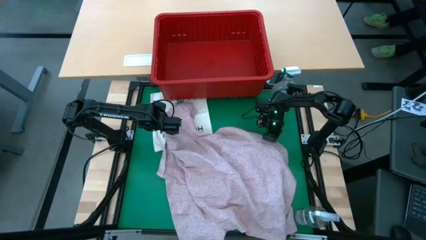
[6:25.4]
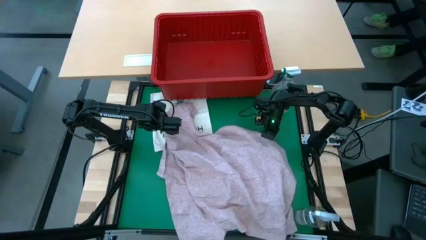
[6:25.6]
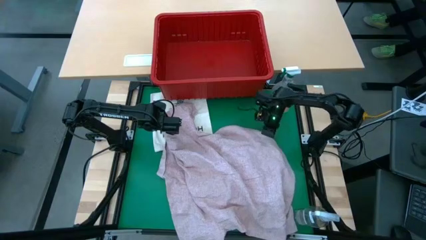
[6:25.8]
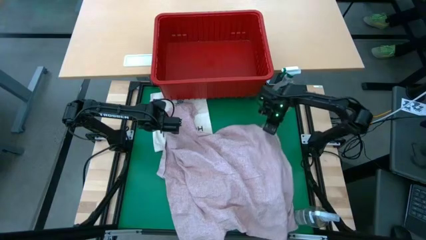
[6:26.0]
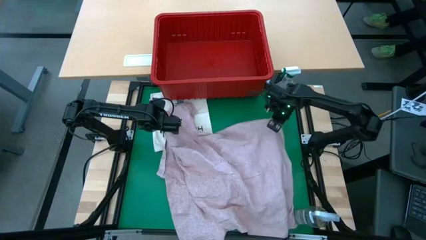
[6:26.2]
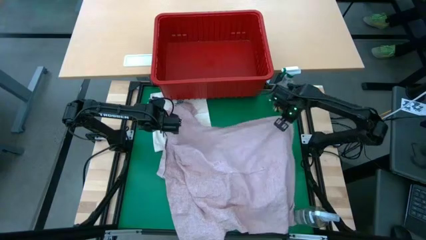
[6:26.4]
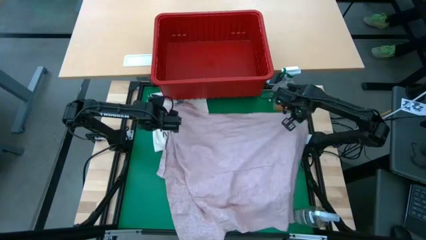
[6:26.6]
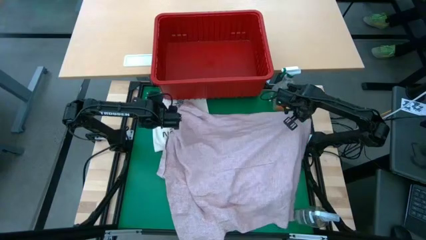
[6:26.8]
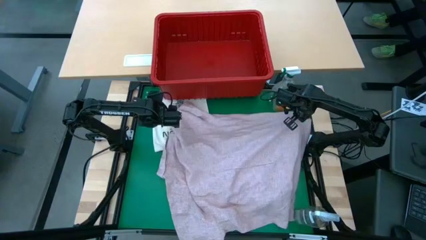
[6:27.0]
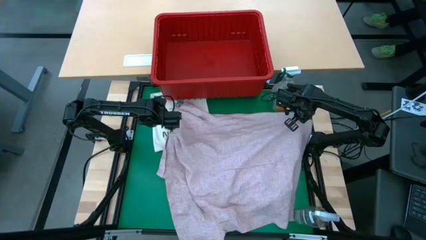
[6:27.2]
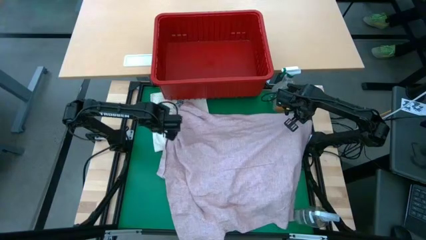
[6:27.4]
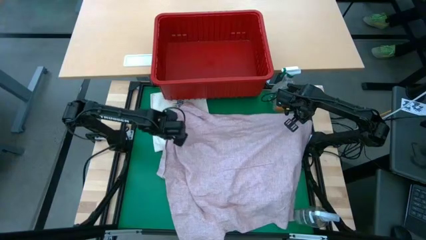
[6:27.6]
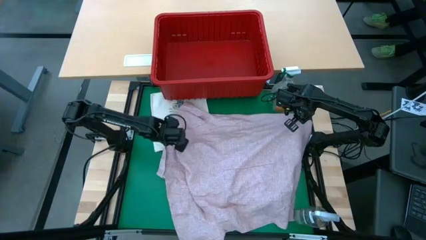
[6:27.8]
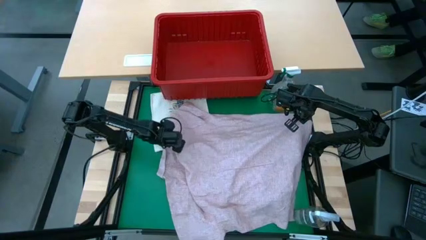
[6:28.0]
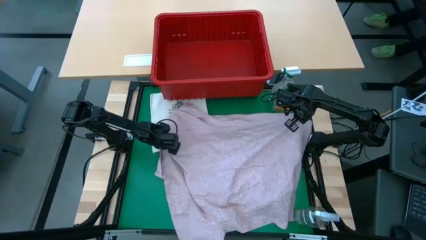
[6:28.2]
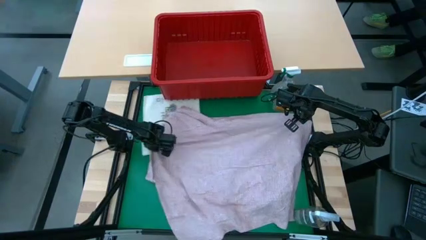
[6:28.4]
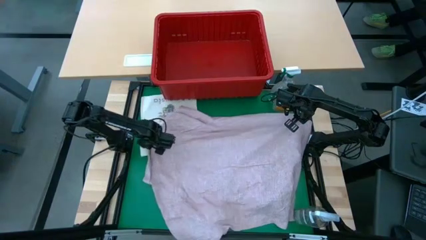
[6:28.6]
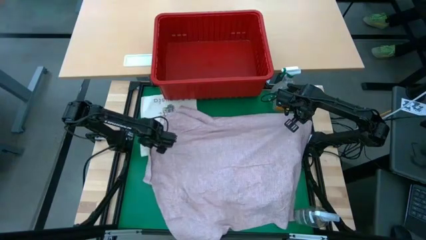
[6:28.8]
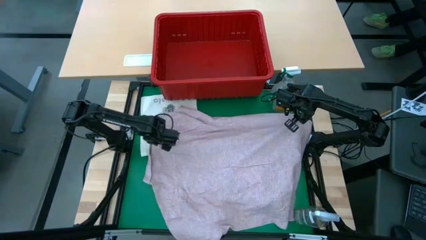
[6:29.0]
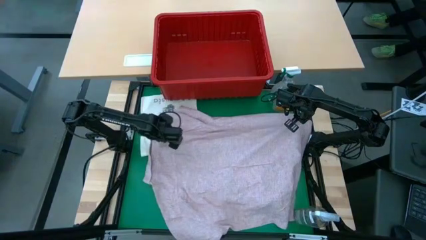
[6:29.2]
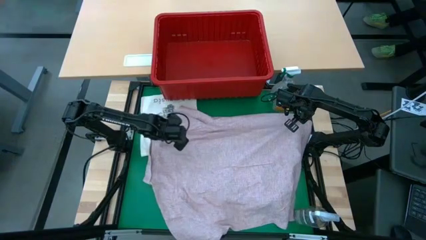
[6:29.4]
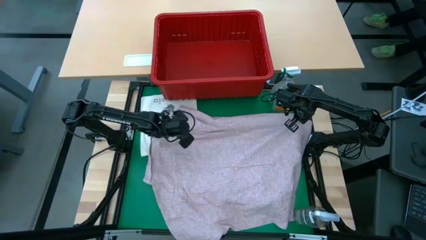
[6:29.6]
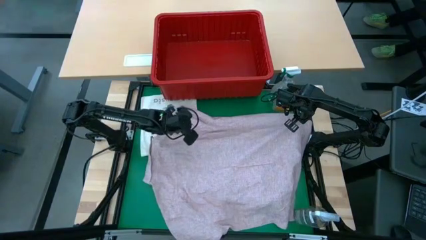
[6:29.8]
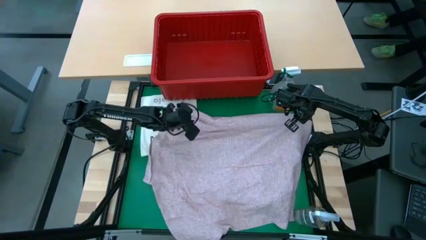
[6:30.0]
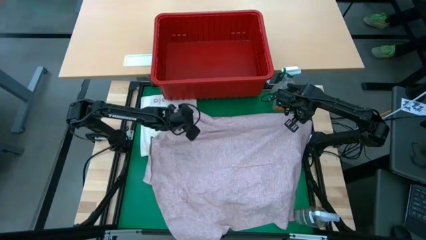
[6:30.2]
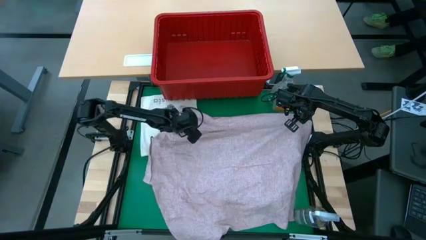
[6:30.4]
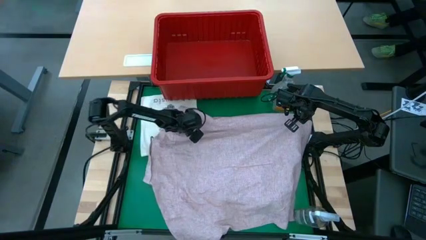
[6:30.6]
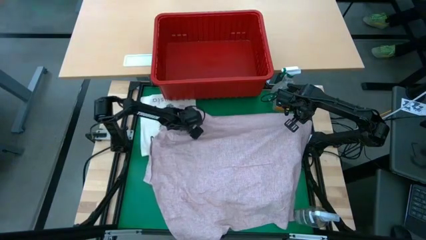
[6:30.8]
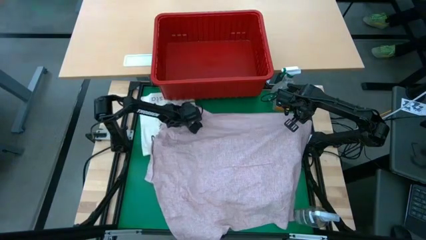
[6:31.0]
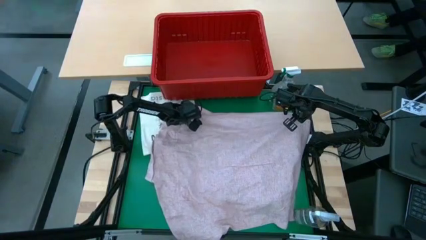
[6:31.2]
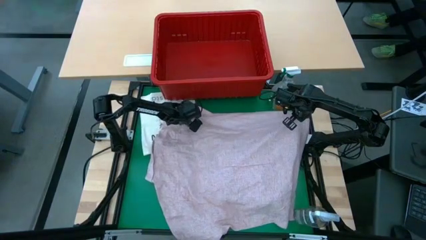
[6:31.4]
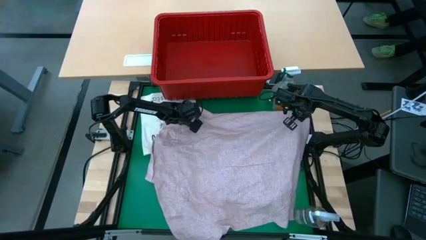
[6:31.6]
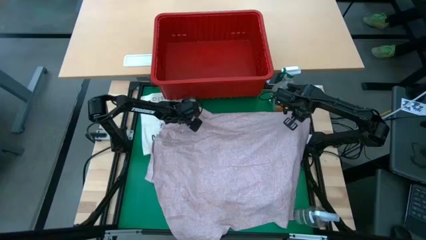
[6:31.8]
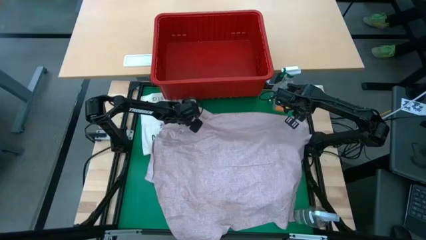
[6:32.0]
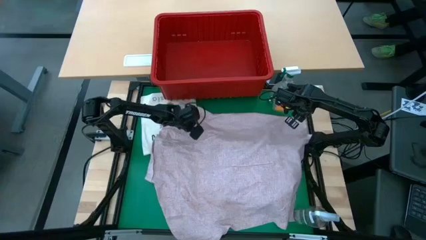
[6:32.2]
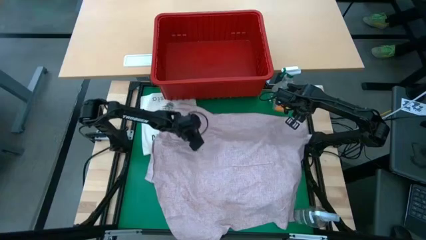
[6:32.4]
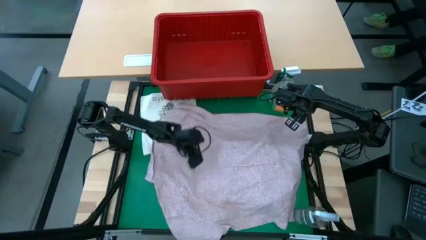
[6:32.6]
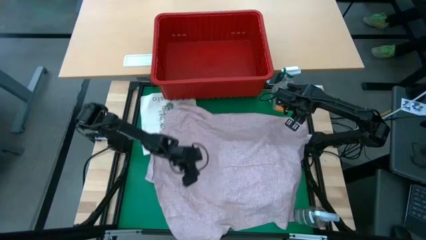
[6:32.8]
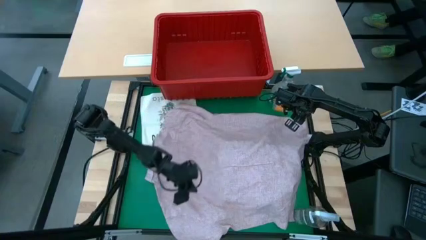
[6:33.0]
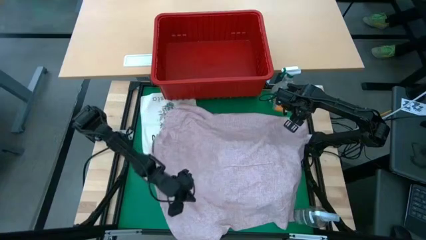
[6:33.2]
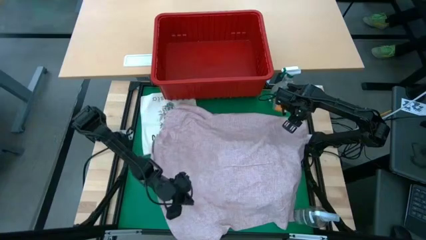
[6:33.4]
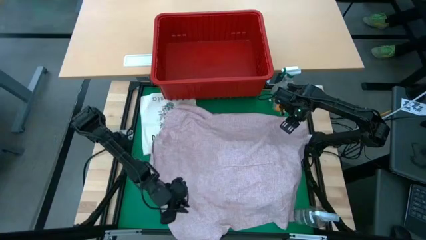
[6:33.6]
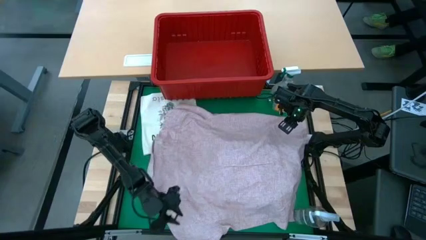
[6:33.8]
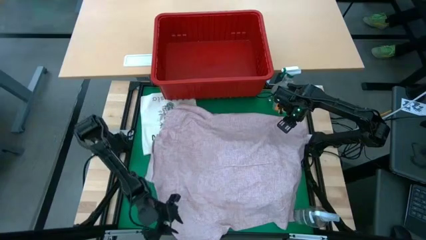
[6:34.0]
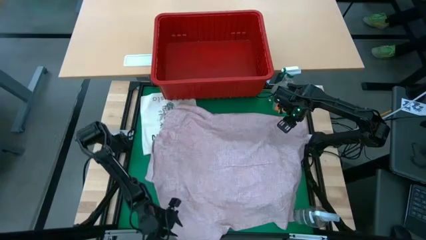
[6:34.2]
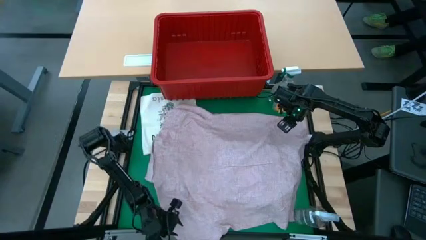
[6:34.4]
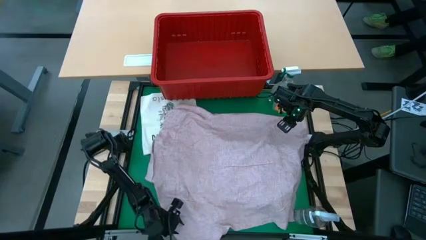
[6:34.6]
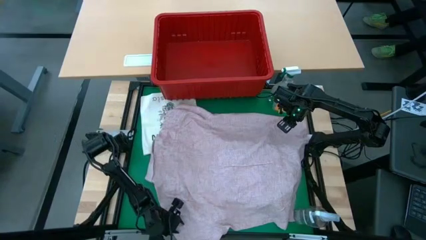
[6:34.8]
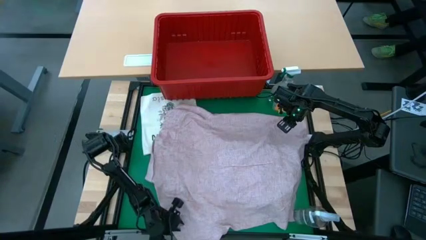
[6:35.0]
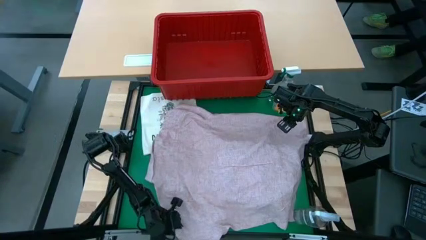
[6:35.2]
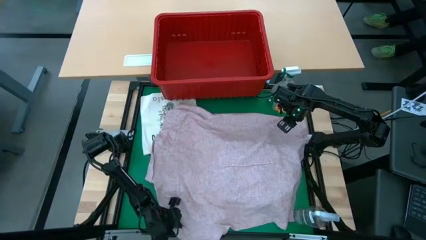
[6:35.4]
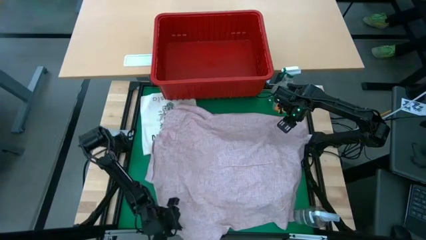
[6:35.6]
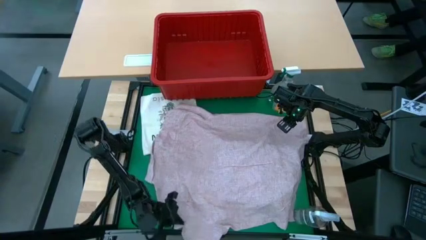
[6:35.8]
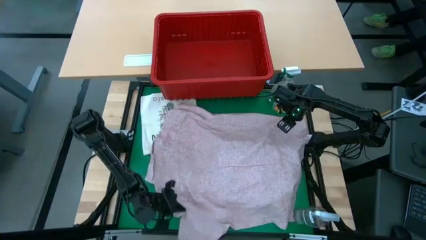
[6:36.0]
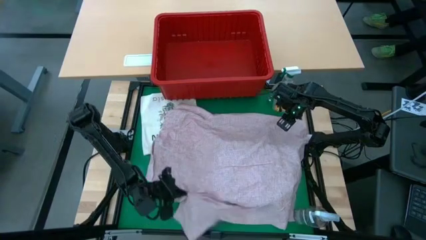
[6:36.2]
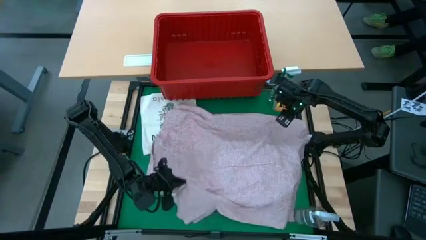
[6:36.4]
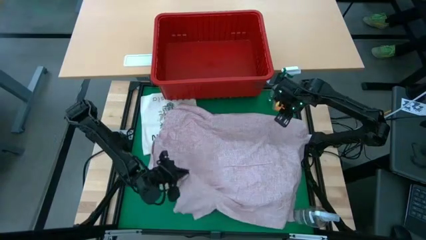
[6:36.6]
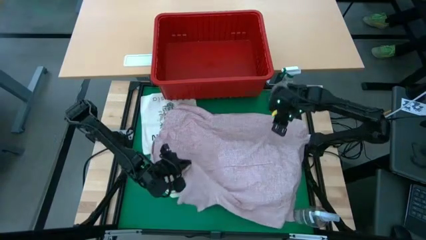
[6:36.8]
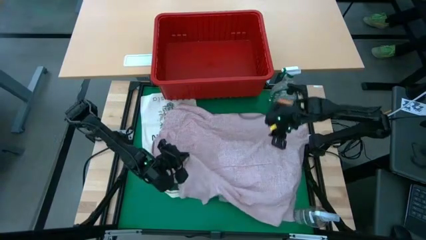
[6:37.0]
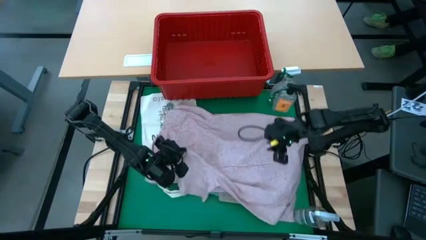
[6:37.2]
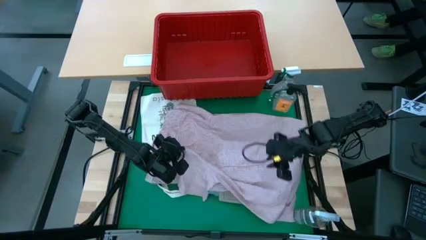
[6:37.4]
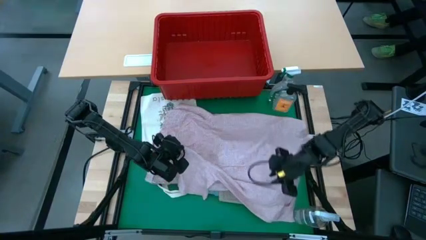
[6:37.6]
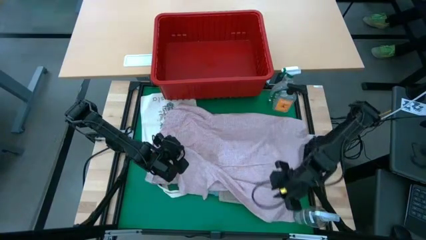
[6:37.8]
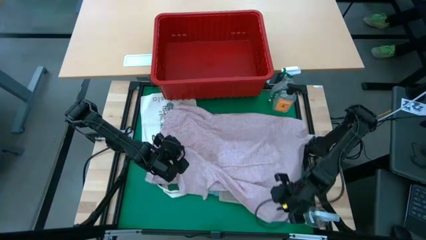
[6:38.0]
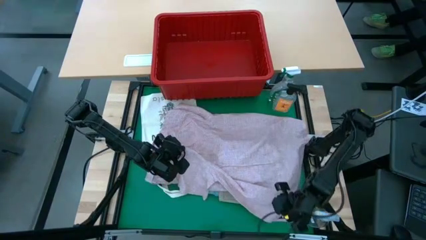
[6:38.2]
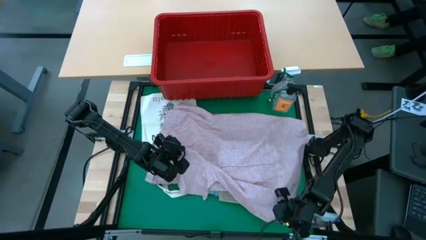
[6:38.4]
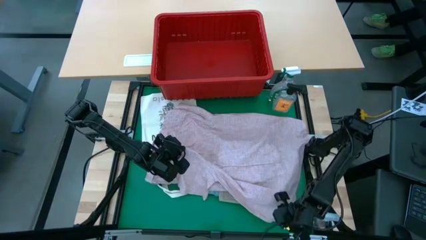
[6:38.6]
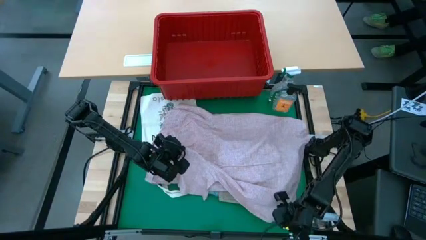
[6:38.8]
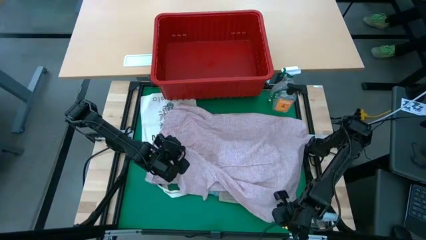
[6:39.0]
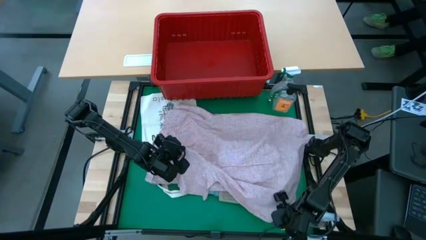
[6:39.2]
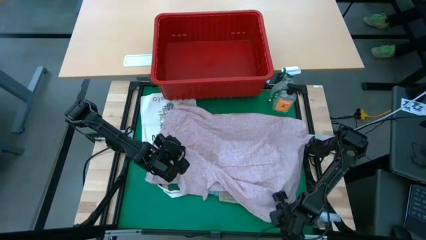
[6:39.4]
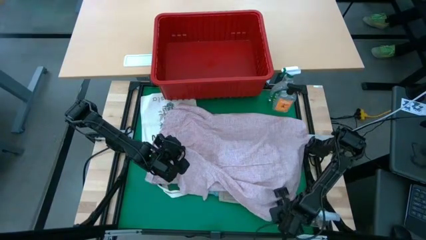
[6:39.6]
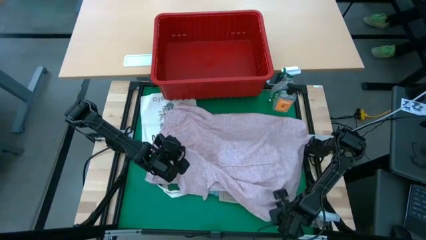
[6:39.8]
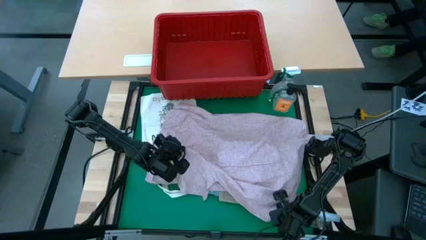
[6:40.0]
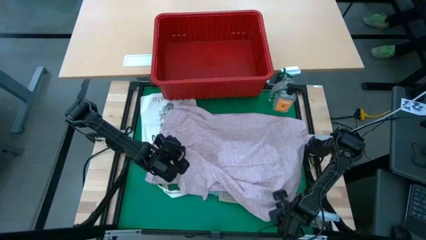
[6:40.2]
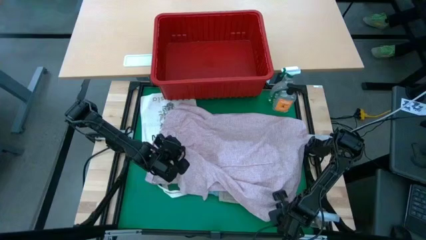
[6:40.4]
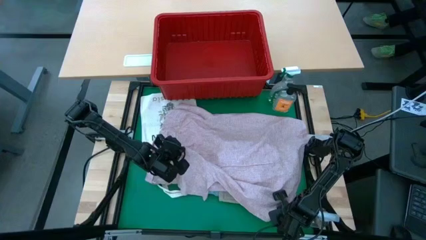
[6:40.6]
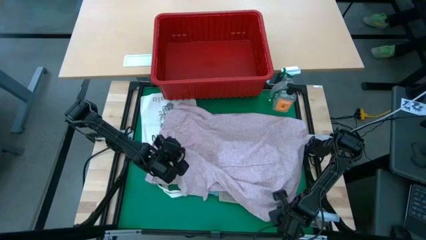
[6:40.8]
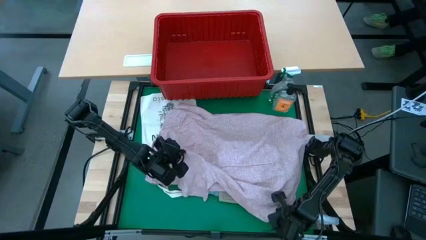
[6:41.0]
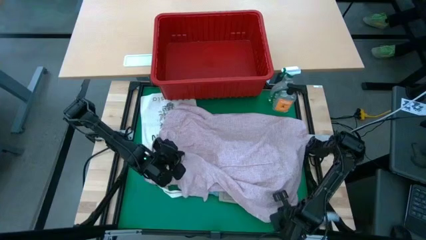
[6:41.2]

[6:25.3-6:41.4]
Task: Fold laundry
Fold the pink polo
